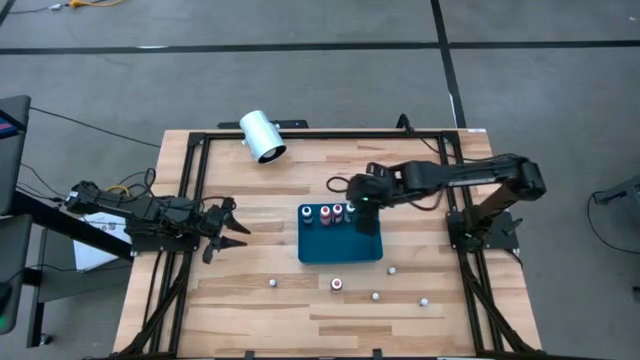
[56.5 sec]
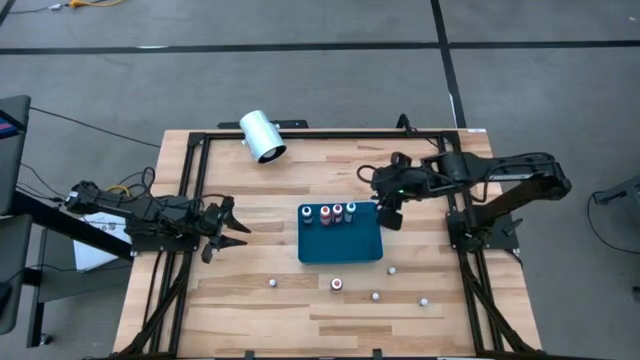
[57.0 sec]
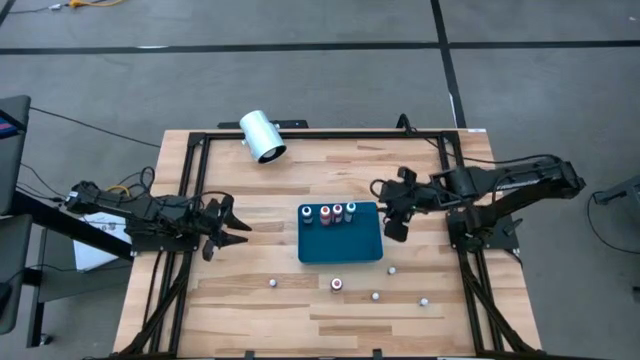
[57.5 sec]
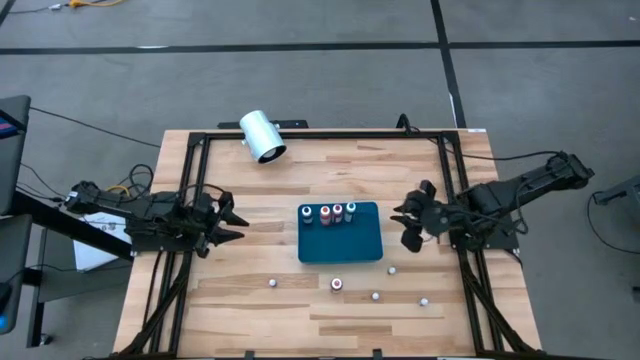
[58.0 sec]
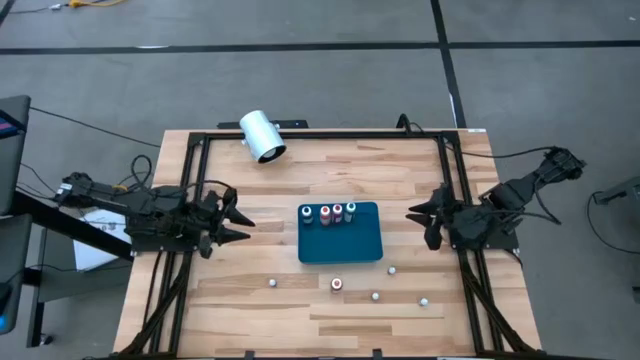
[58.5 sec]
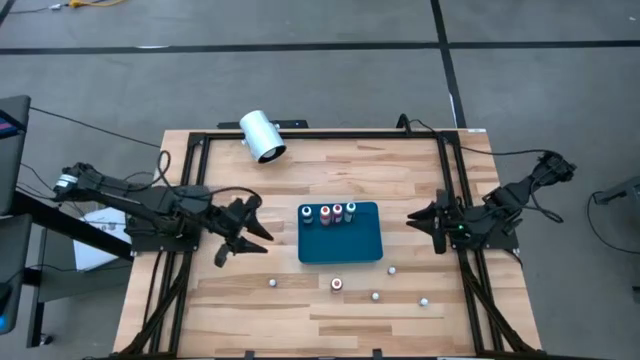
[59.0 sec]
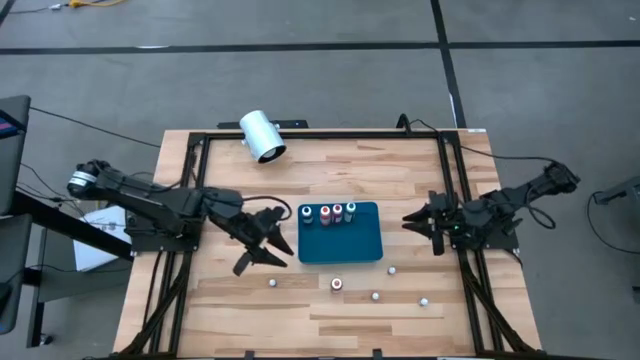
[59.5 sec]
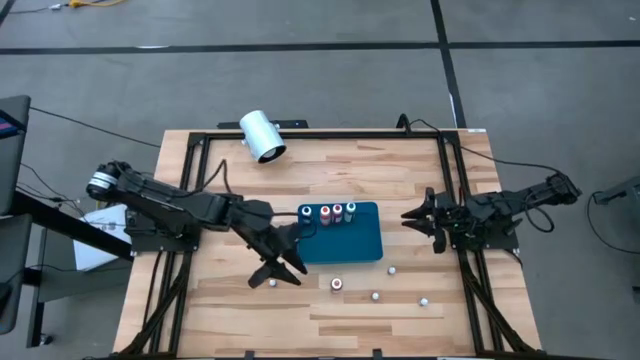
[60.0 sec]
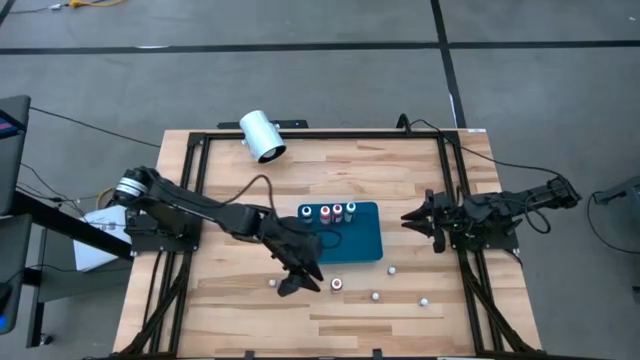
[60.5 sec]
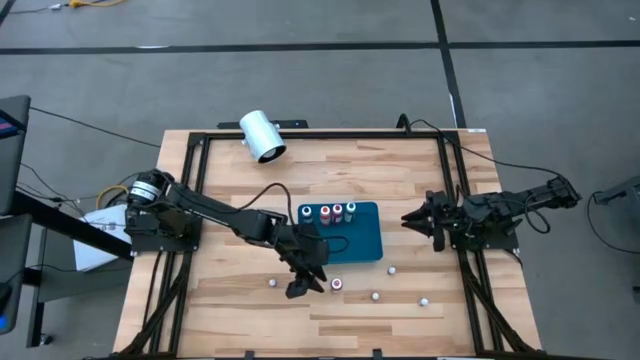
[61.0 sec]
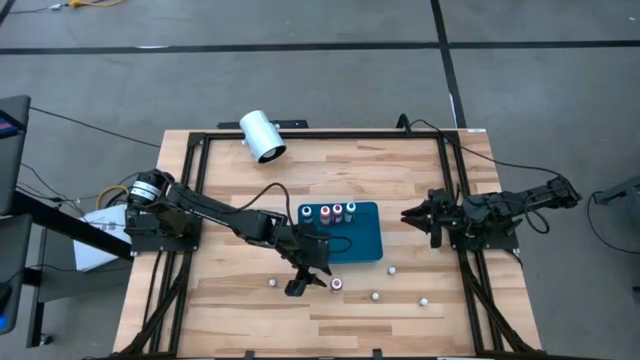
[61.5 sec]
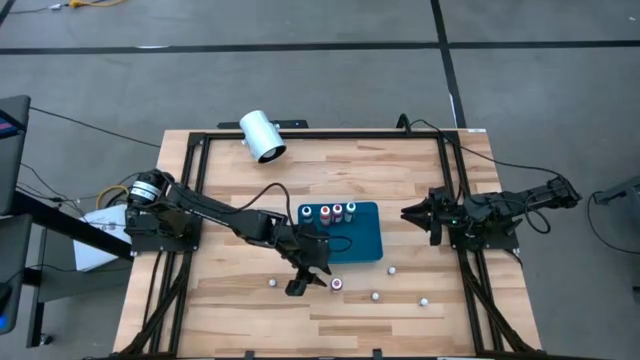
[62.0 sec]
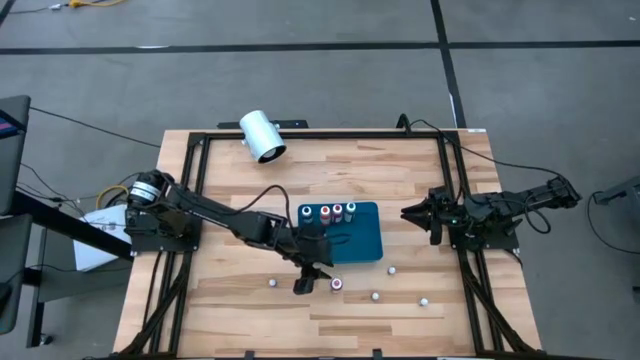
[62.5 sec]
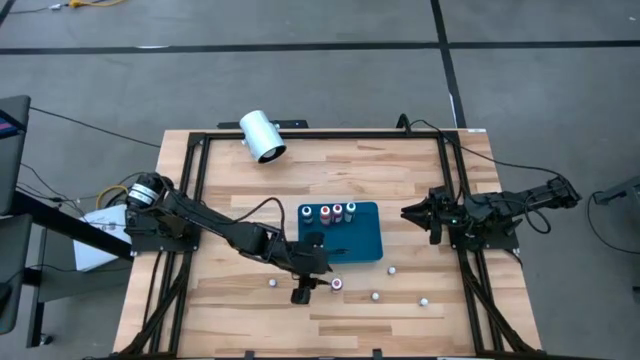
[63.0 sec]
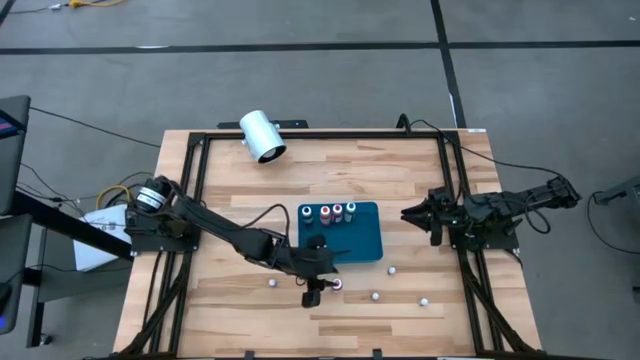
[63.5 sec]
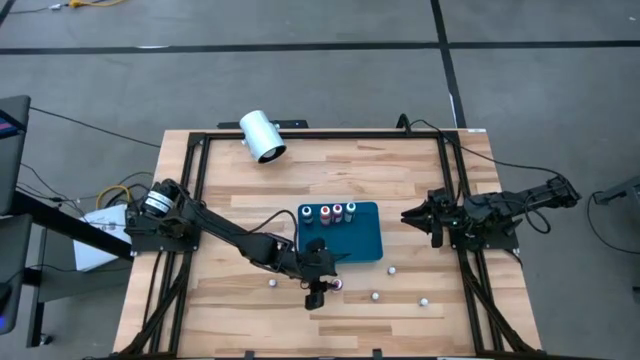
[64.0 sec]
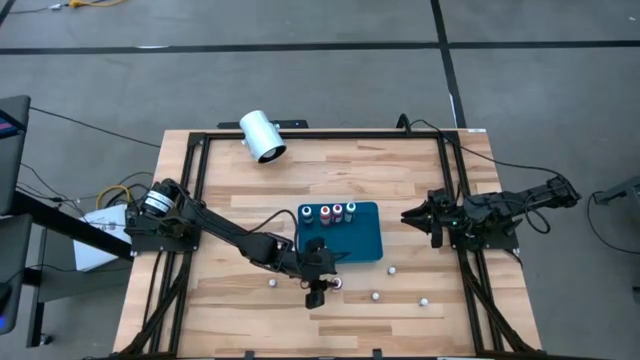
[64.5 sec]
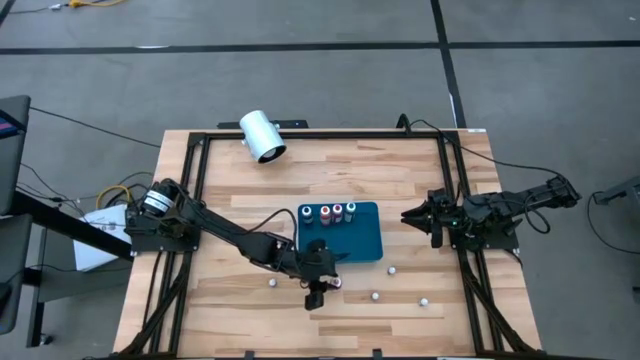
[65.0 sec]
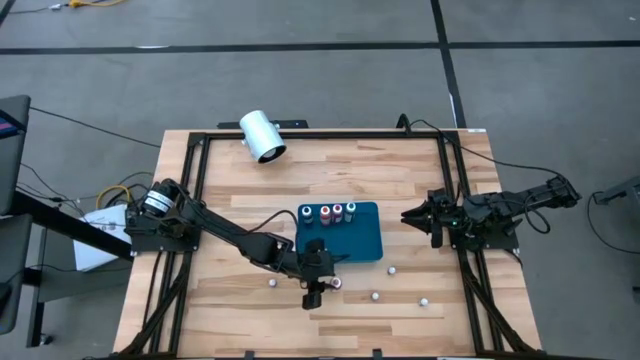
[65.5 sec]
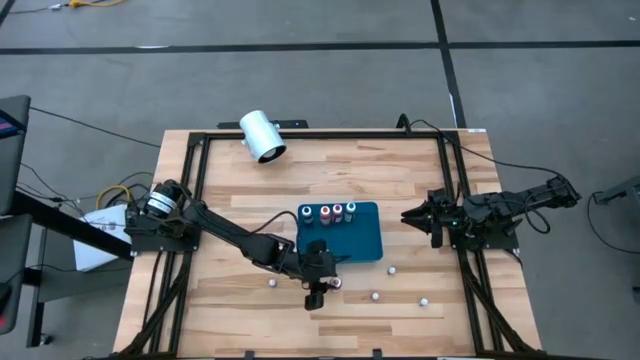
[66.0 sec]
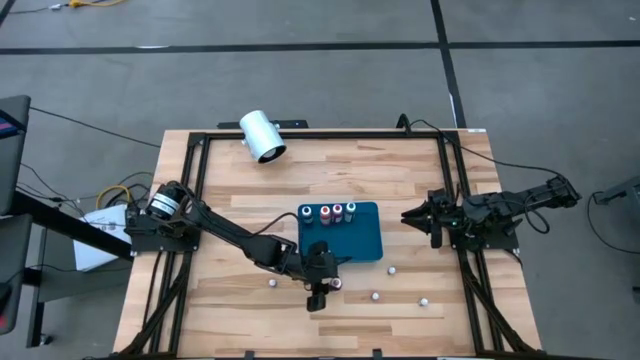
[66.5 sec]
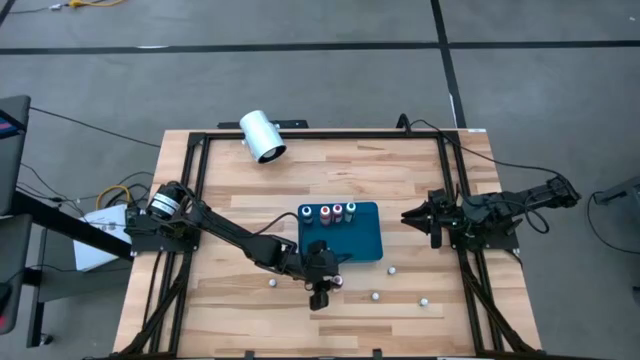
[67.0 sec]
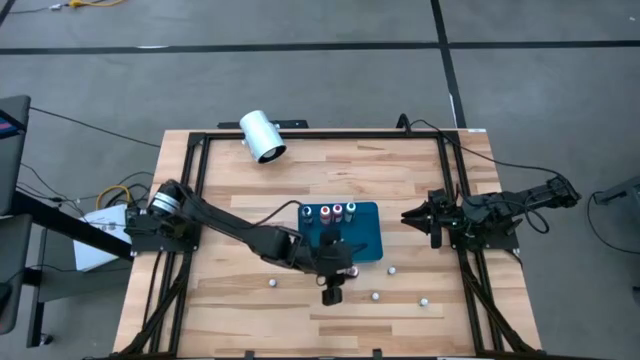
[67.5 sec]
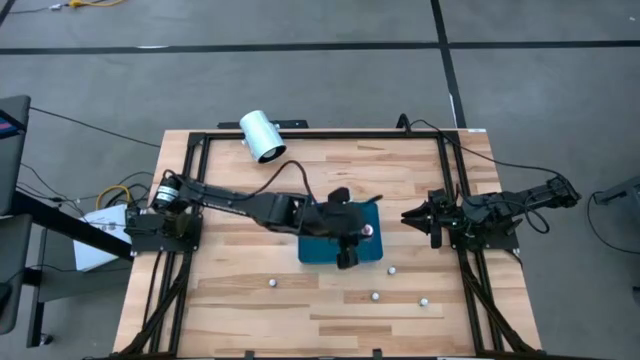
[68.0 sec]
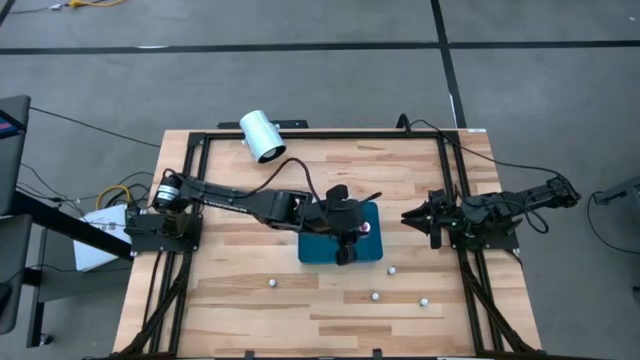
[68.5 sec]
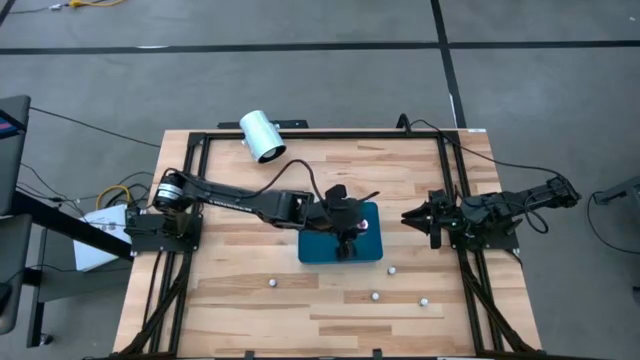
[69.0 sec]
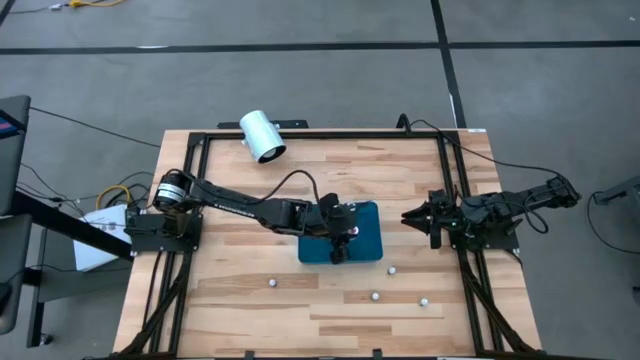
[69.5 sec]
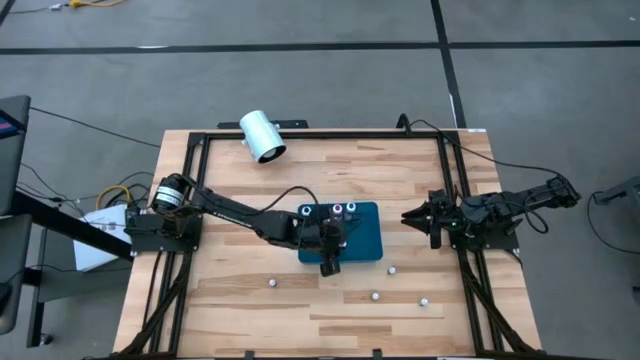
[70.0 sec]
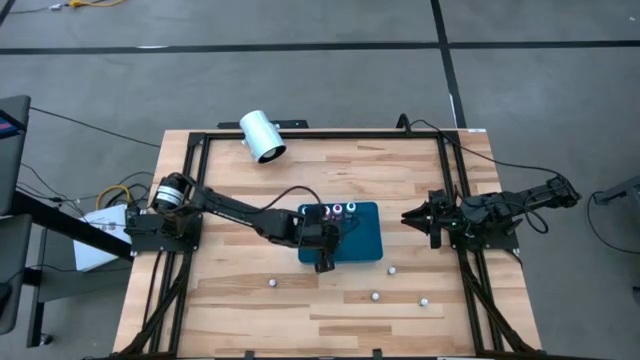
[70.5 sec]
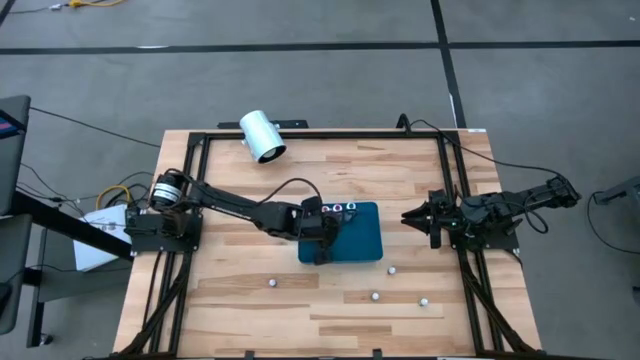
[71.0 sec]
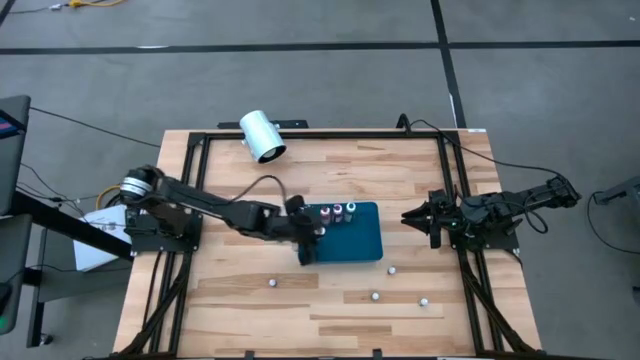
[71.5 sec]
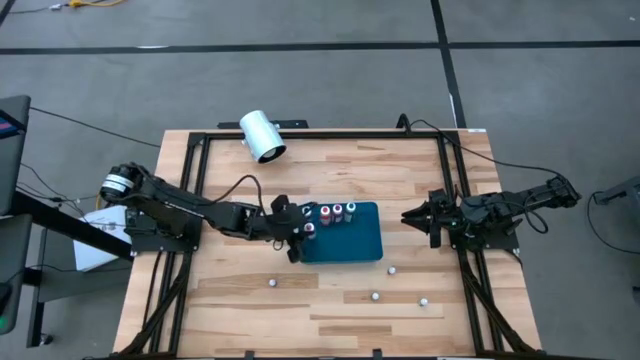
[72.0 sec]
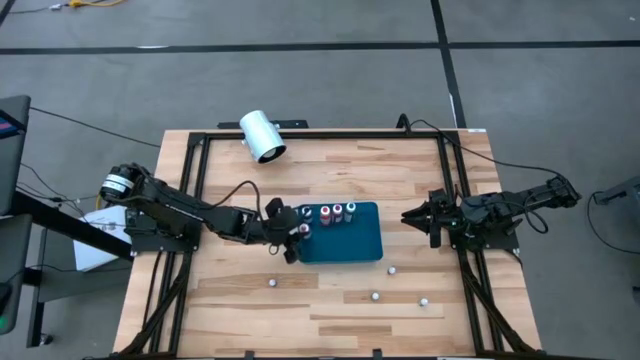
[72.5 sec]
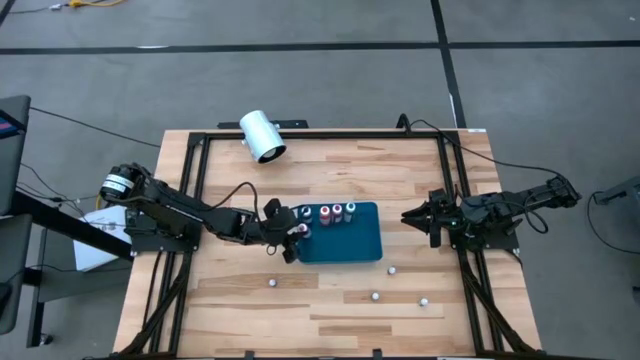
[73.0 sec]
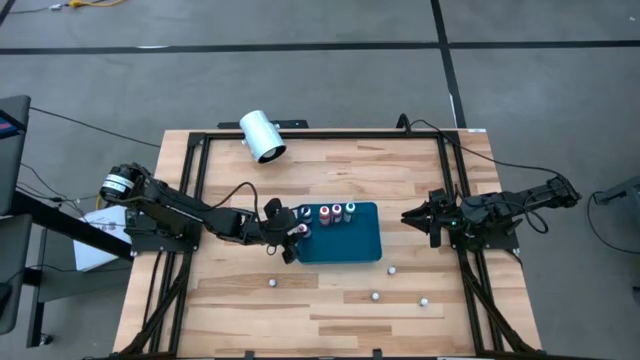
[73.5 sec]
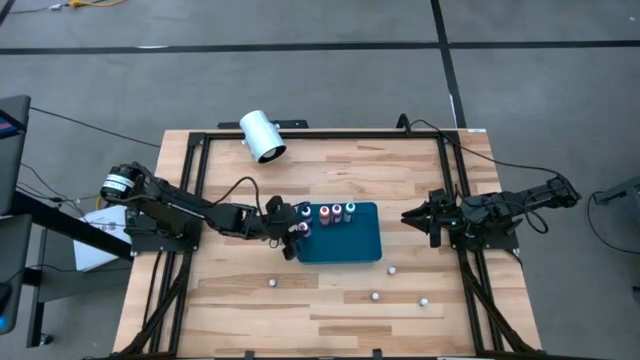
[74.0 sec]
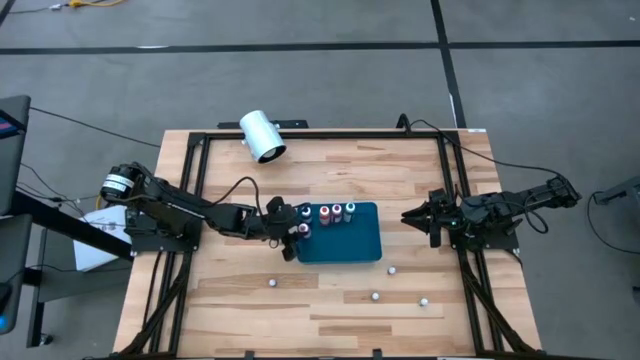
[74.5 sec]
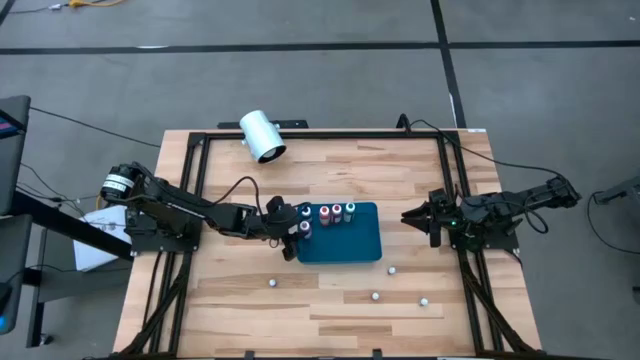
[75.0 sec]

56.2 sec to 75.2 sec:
Task: Pick & Place food coloring
Put the large pink food coloring bottle into the blue bin

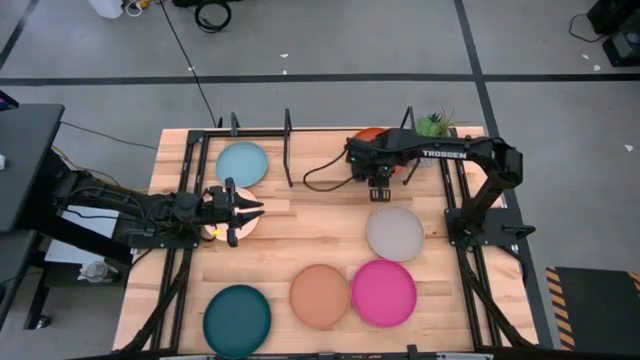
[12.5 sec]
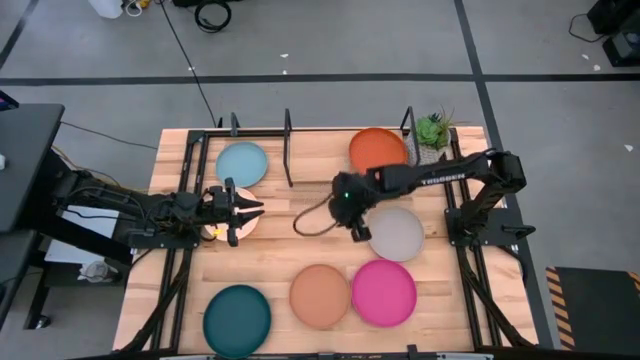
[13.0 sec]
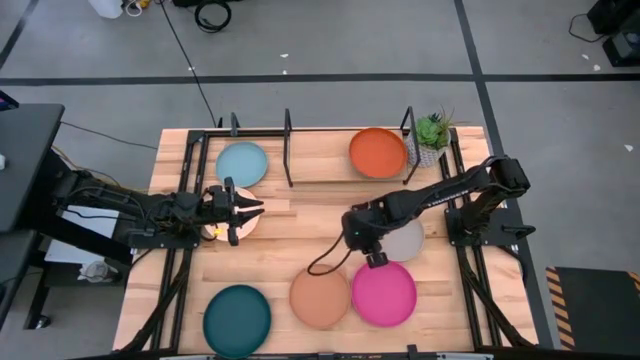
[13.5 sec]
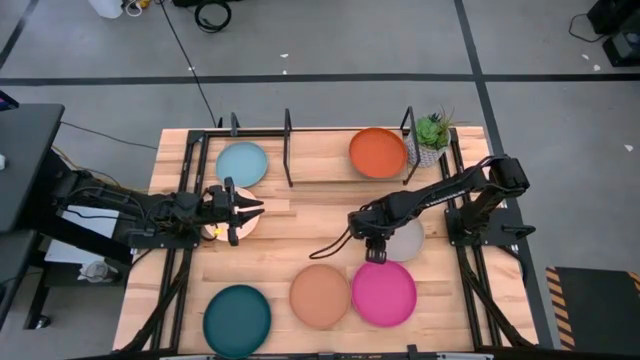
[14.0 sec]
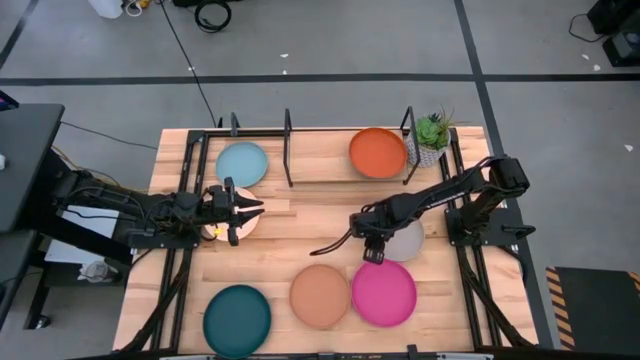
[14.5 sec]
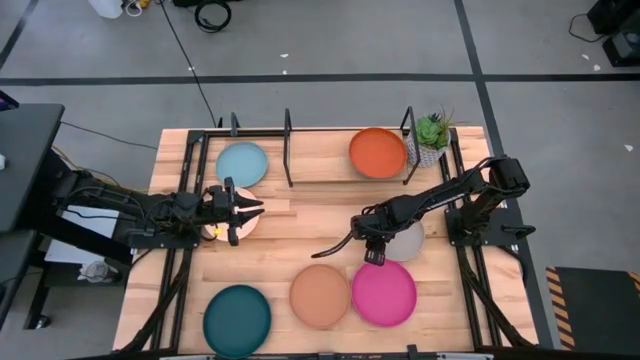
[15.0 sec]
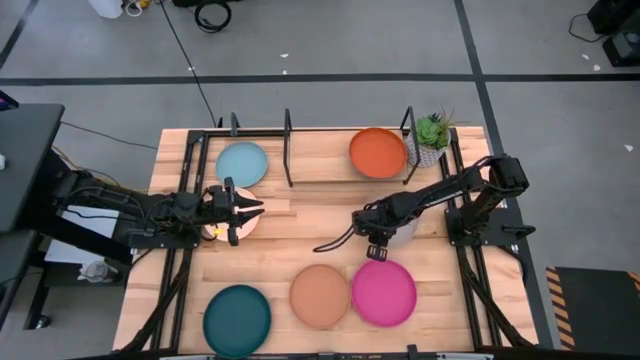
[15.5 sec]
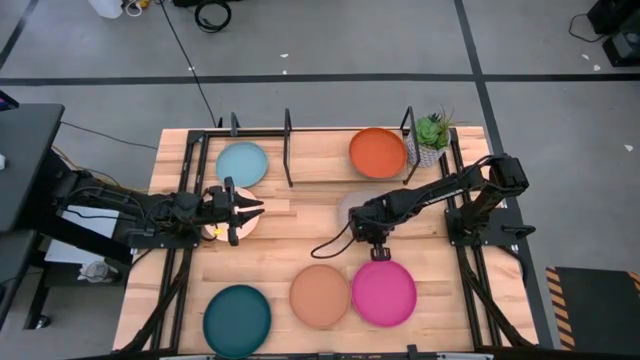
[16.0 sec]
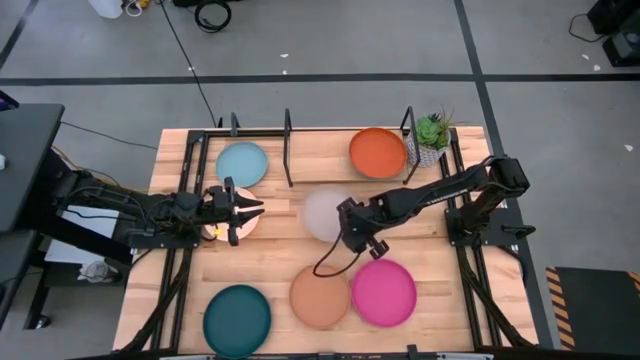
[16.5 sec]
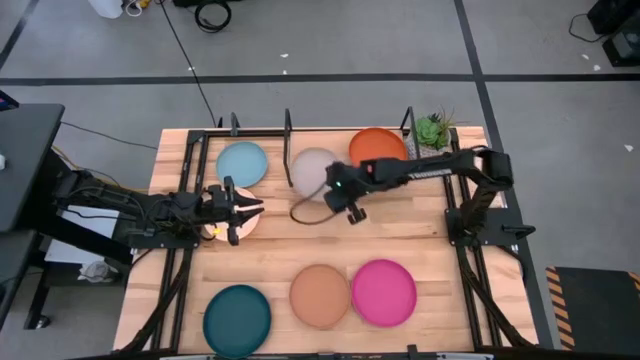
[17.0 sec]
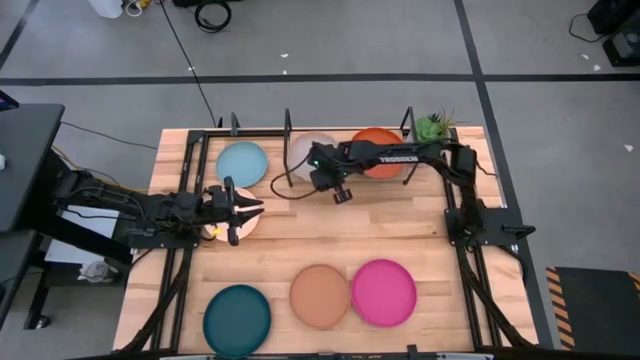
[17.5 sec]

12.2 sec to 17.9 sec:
Task: Place and stack plates onto a shelf
Put the gray plate on the shelf
